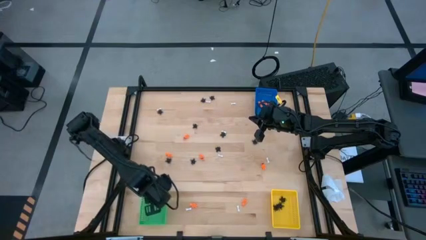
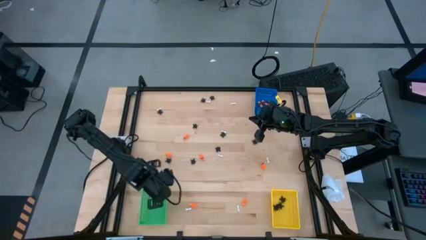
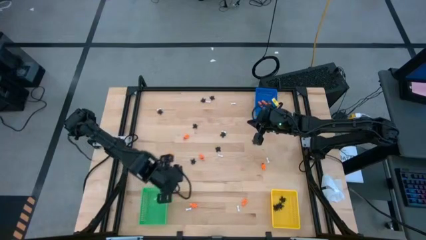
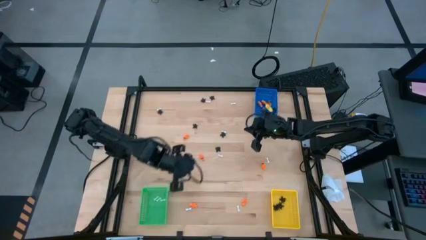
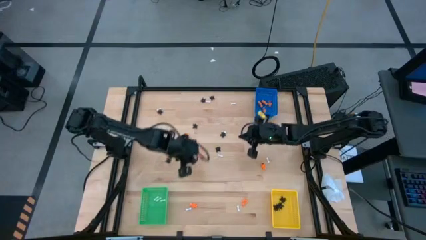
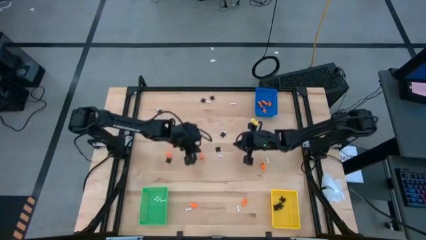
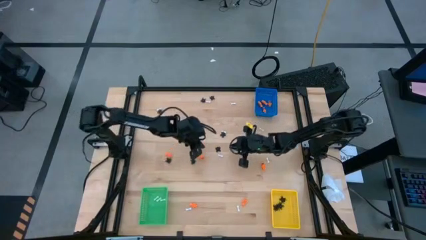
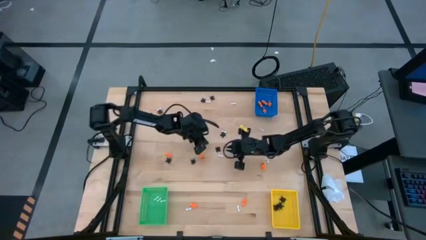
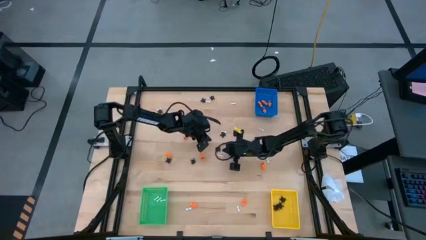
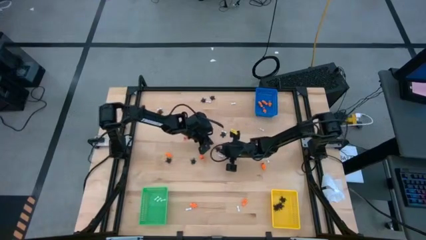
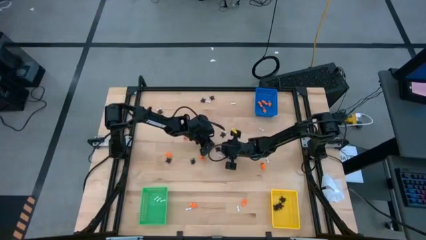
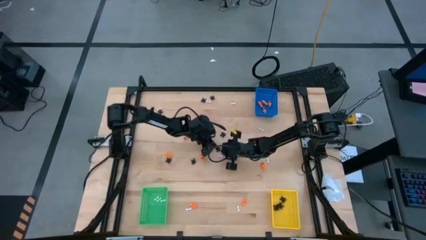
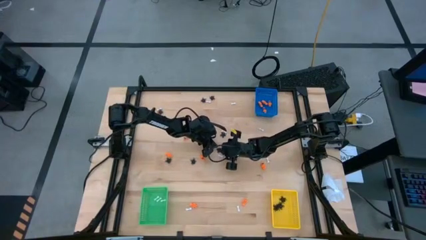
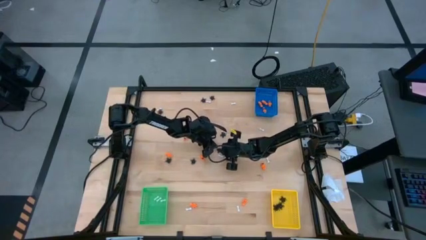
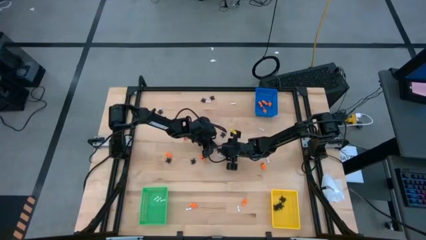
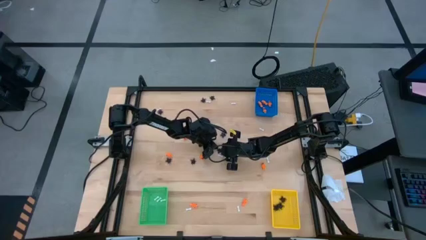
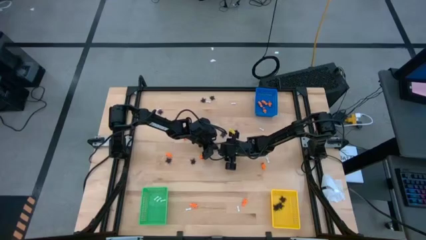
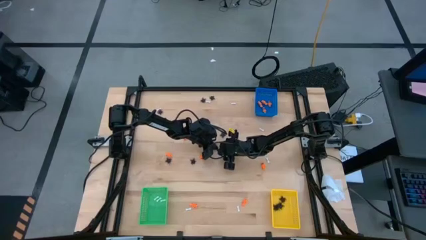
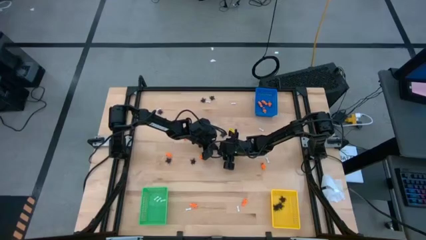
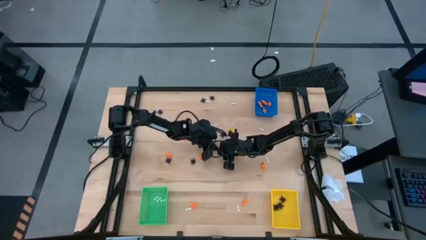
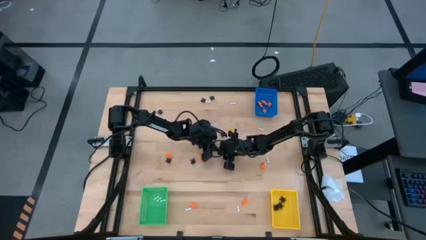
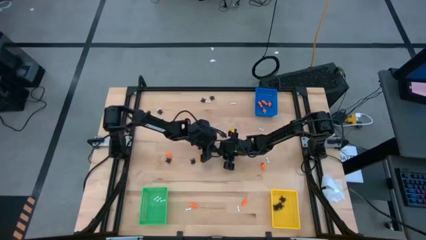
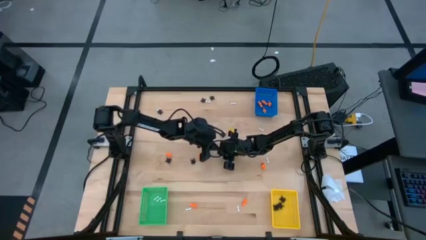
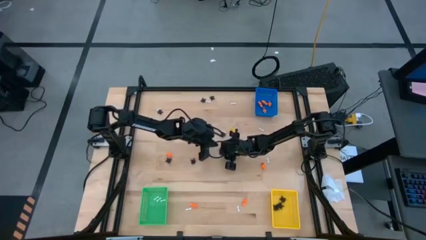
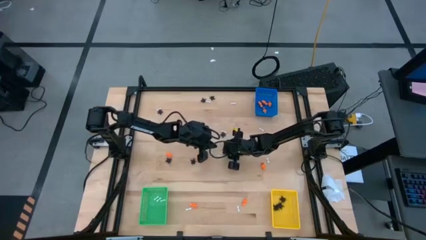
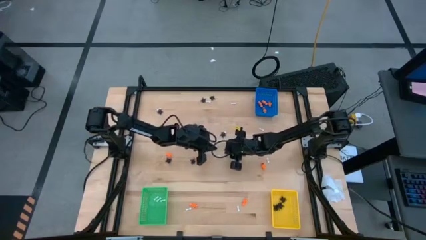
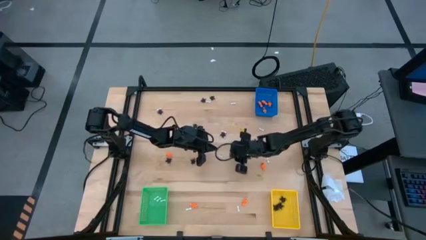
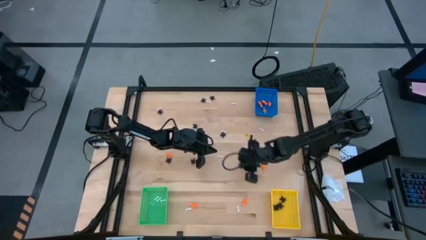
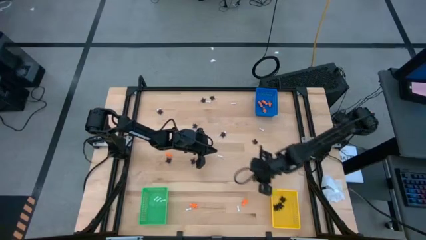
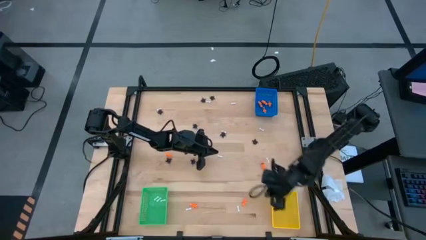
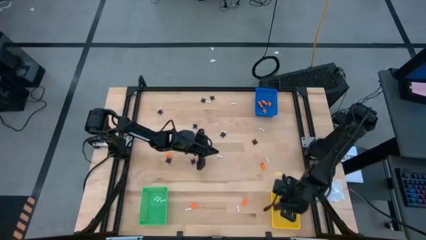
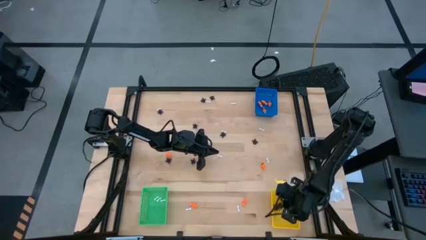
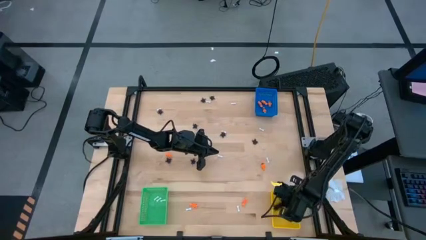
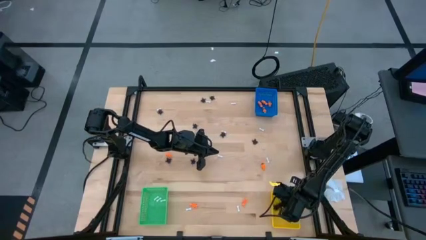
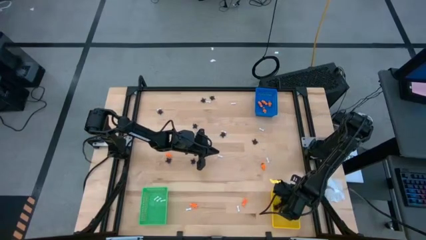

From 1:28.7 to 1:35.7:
Task: Sort Halloween decoration
Put the black spider toy into the yellow bin

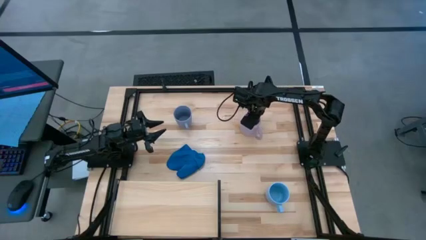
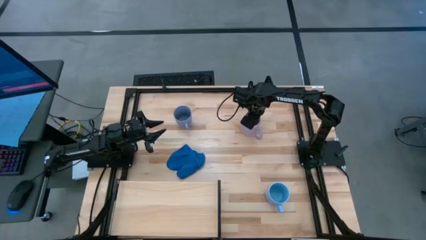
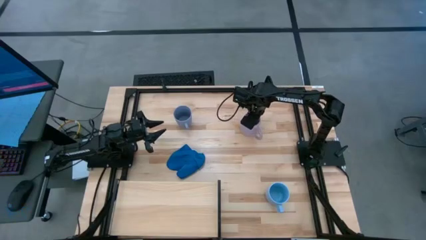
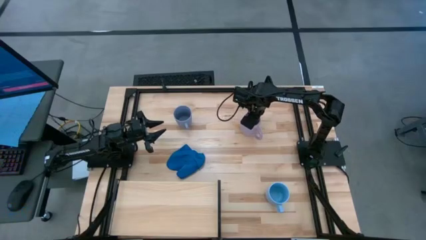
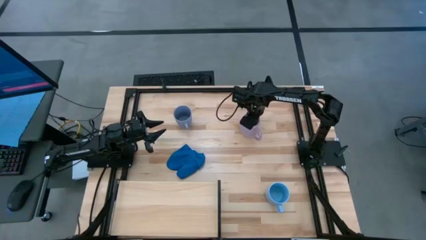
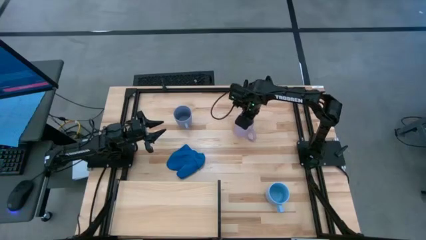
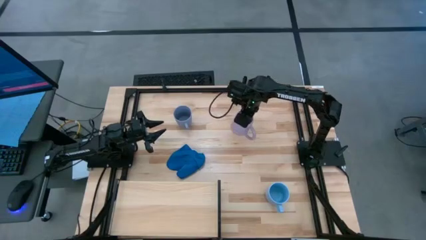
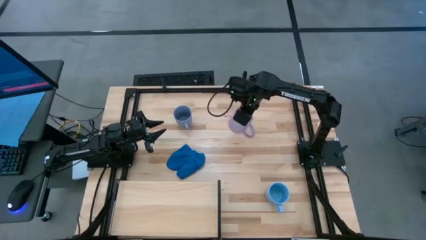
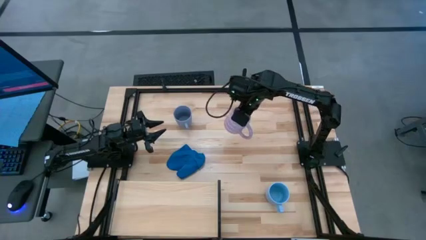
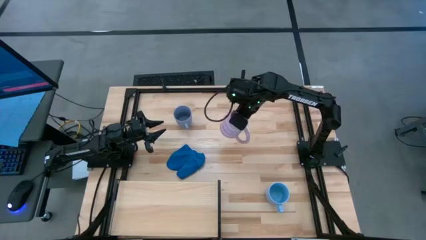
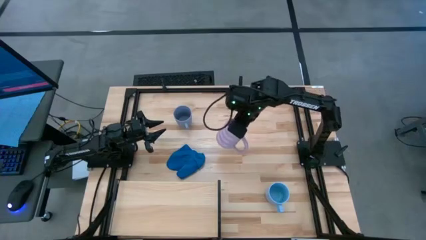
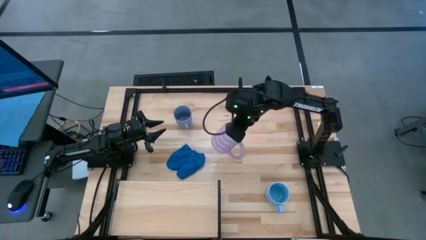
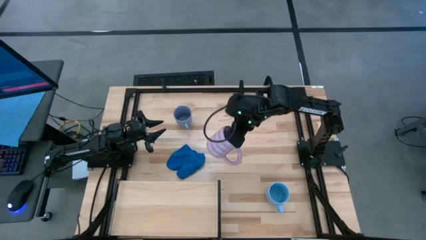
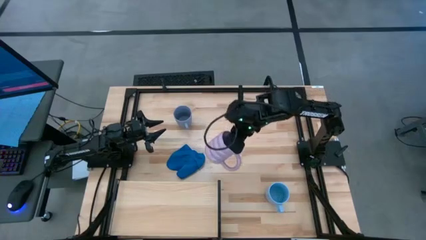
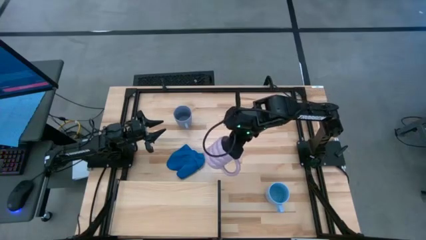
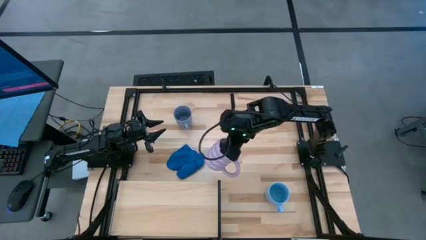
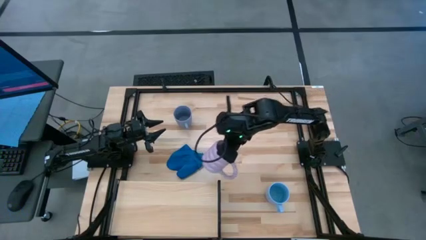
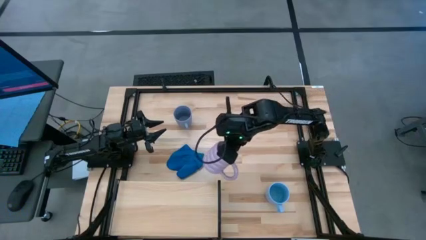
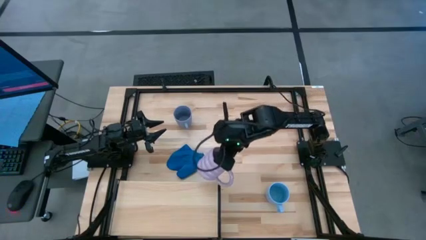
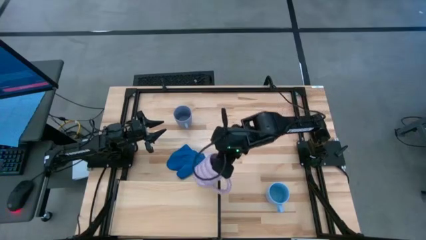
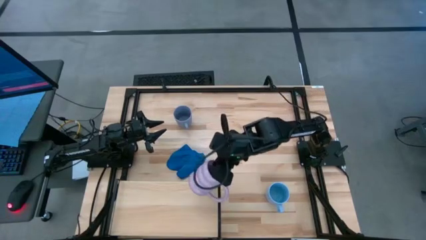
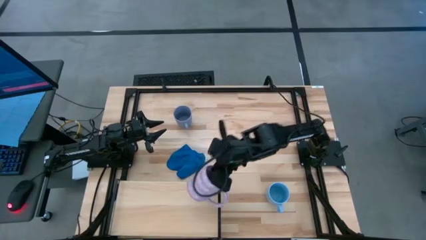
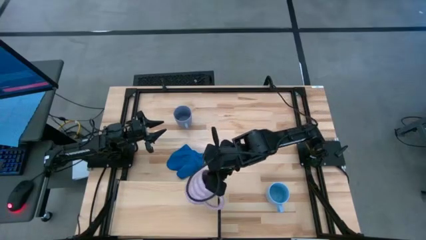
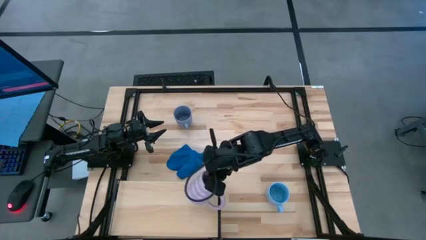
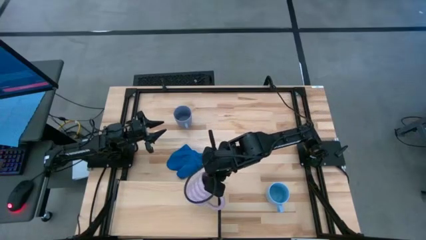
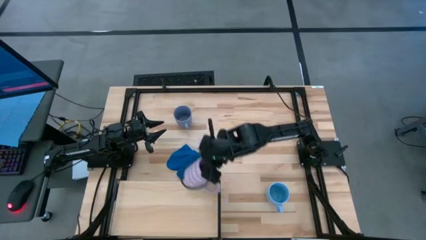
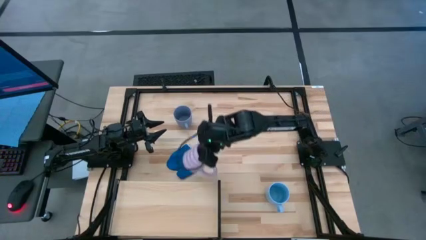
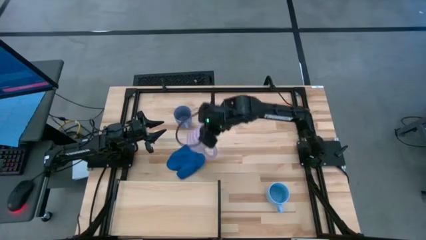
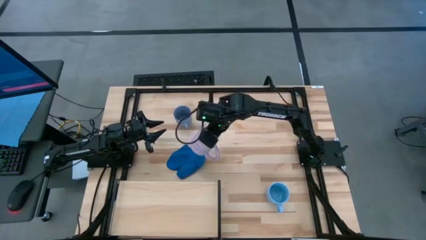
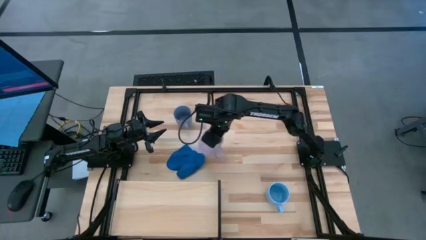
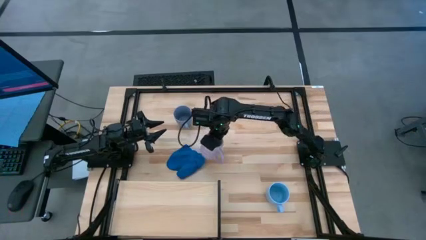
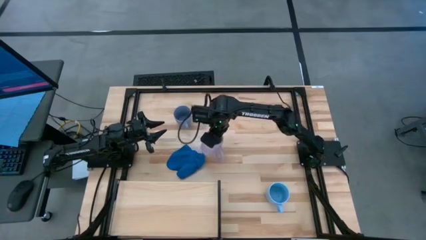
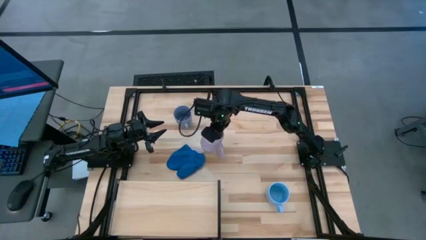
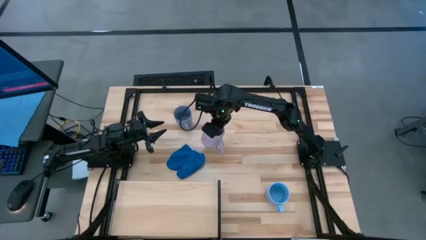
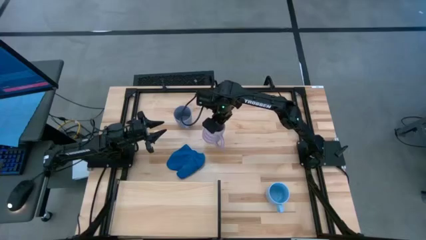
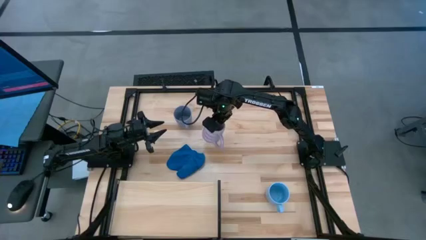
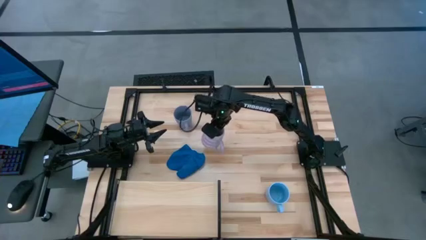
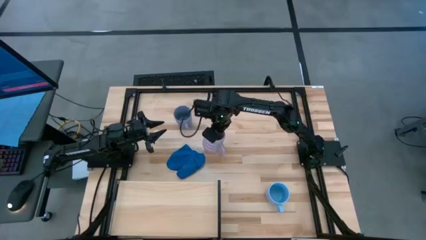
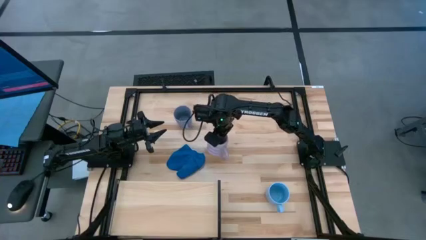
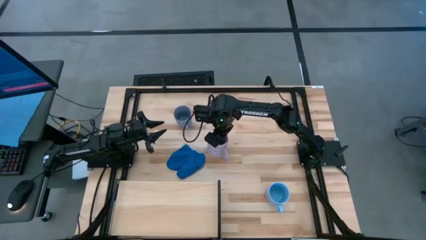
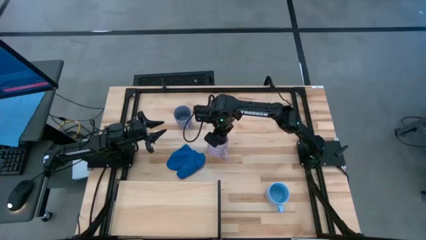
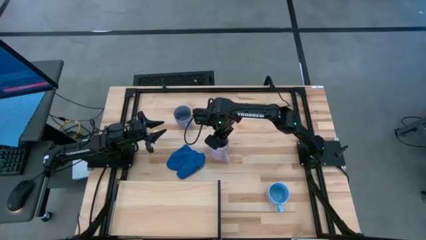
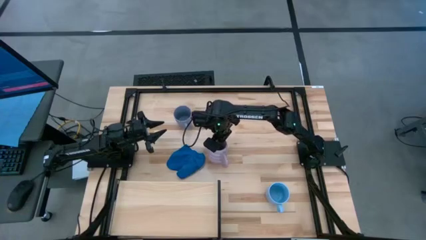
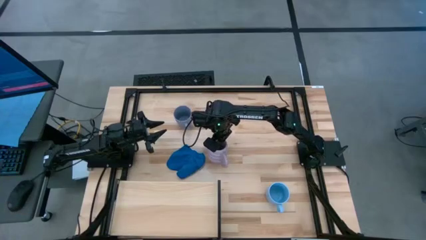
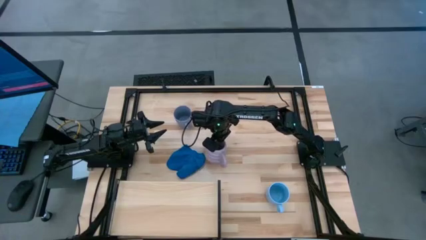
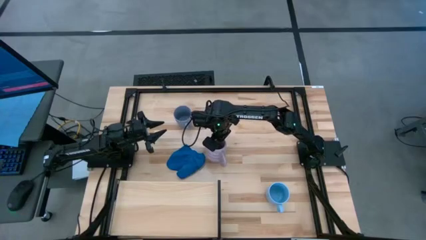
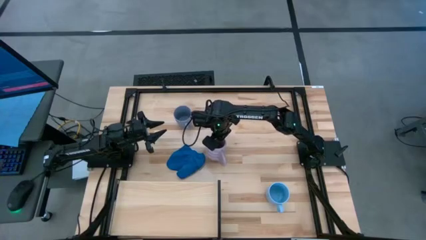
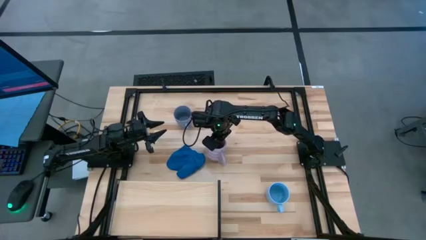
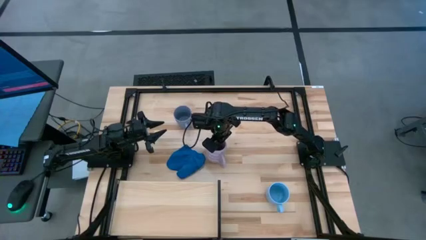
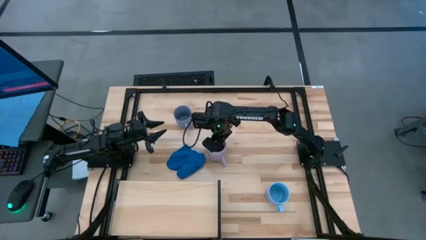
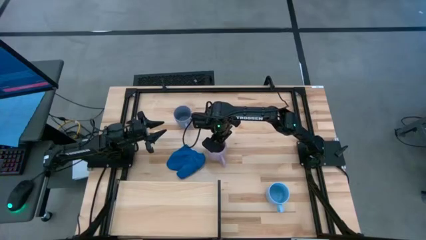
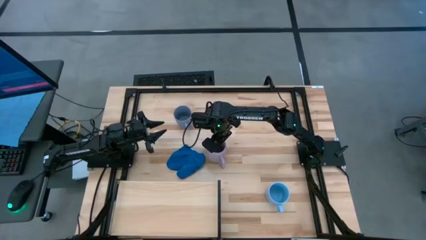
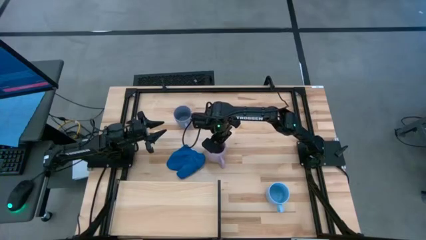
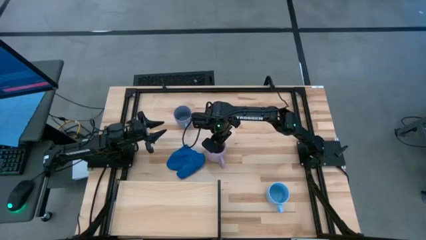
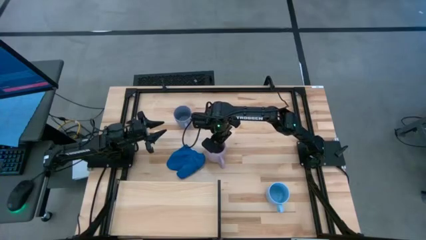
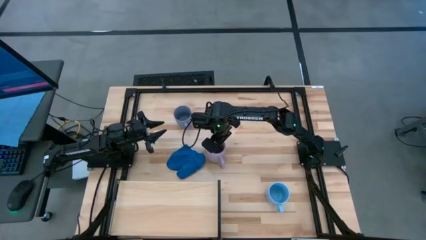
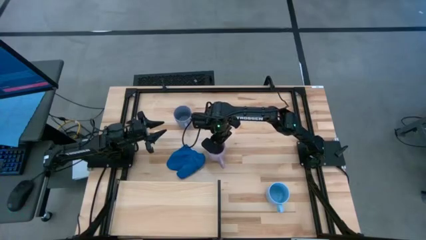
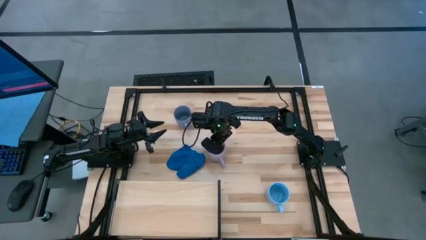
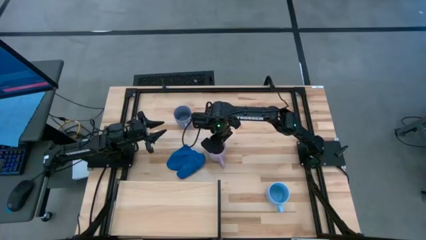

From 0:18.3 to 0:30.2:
Task: Stack small to large cups/mugs on shelf
Move the violet mug from the top right to the center on the table
